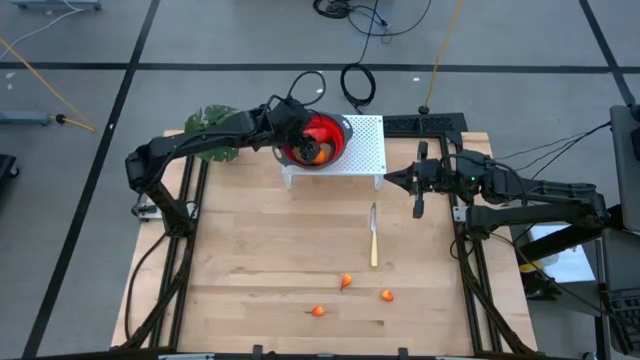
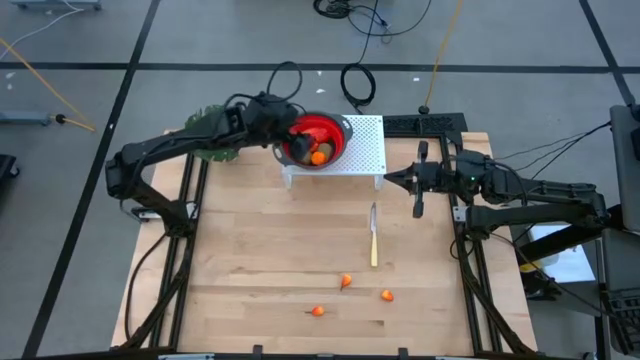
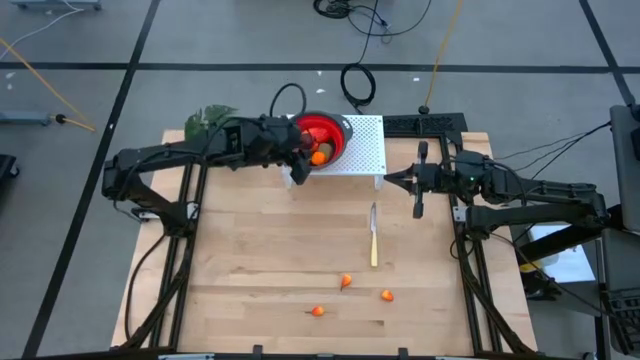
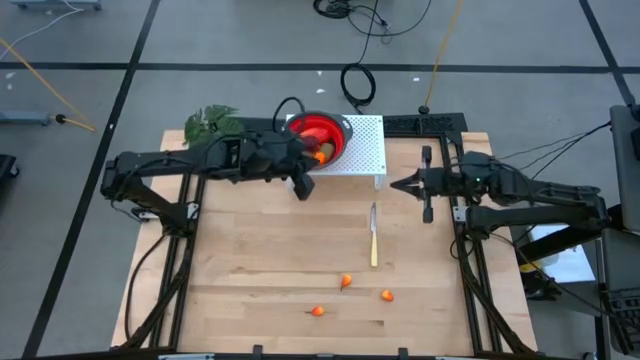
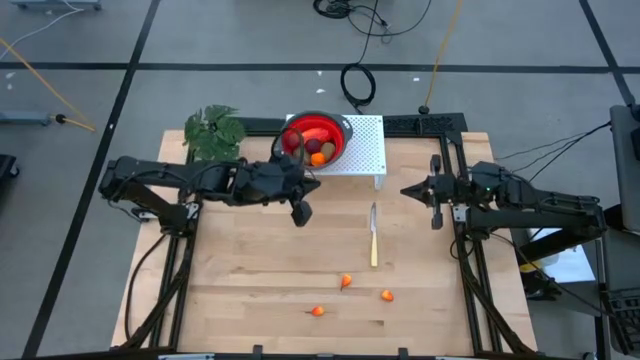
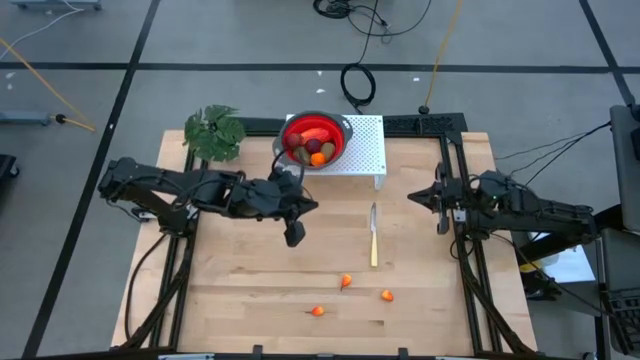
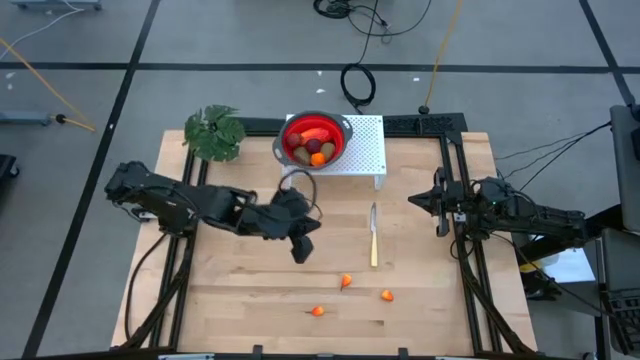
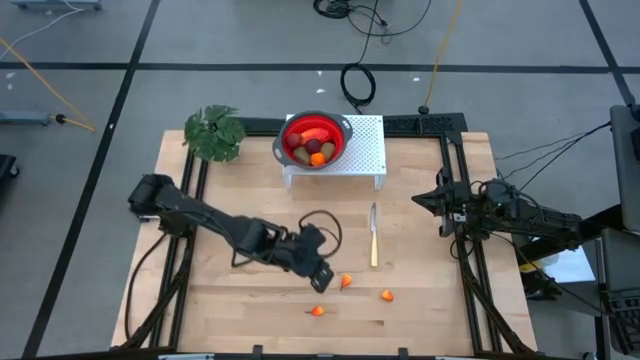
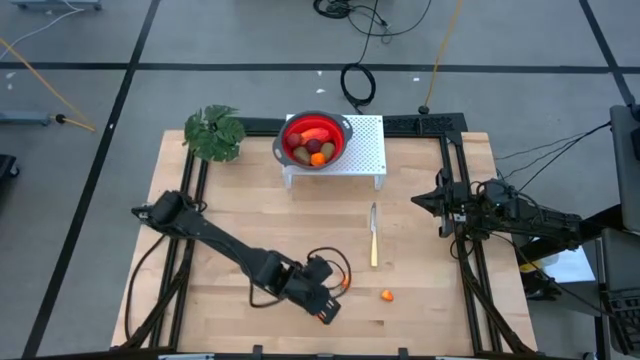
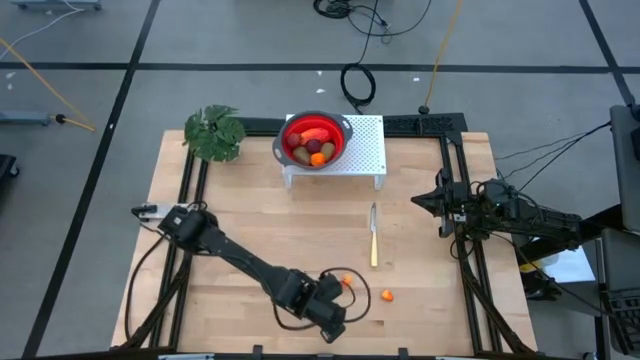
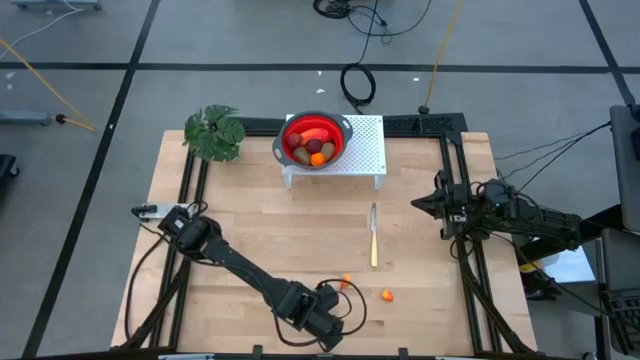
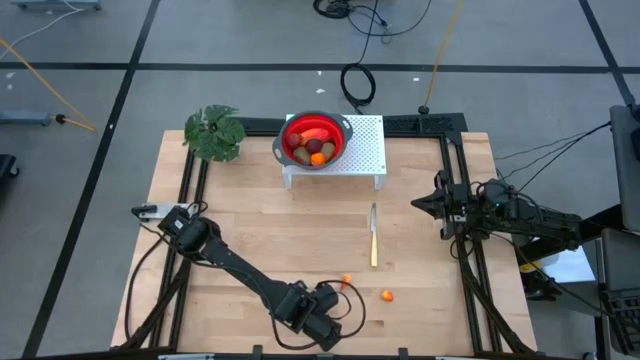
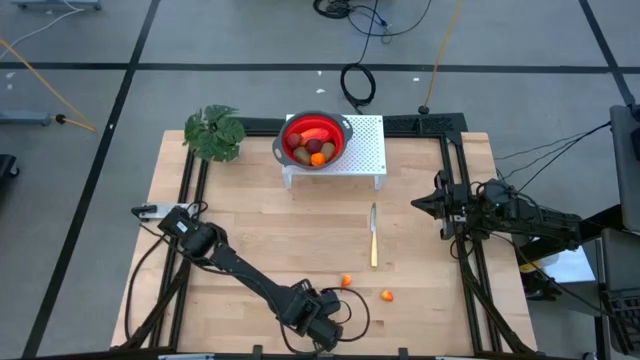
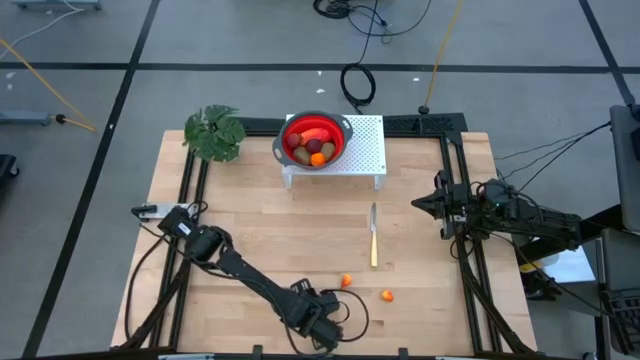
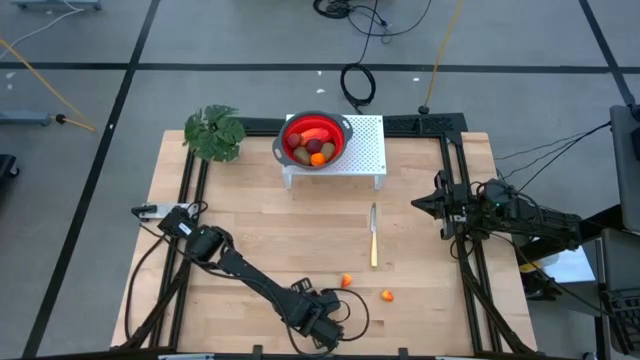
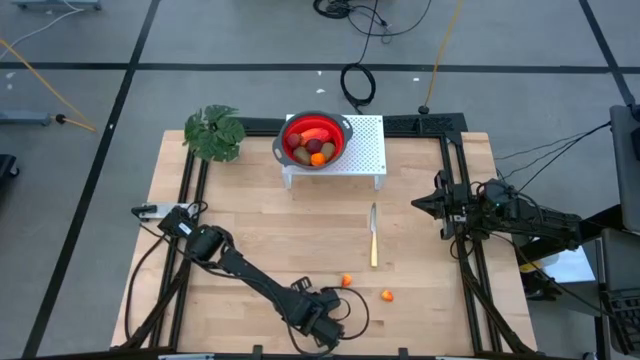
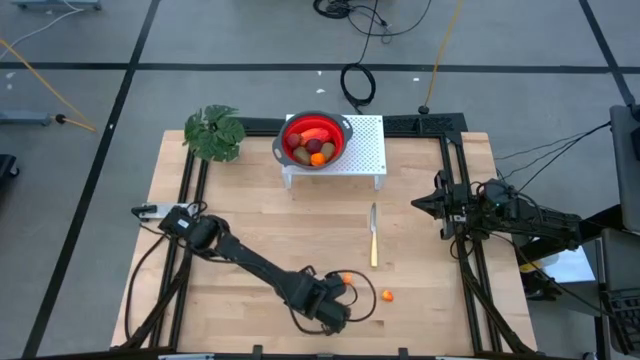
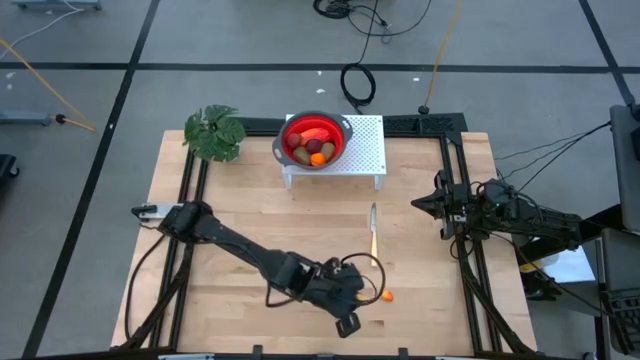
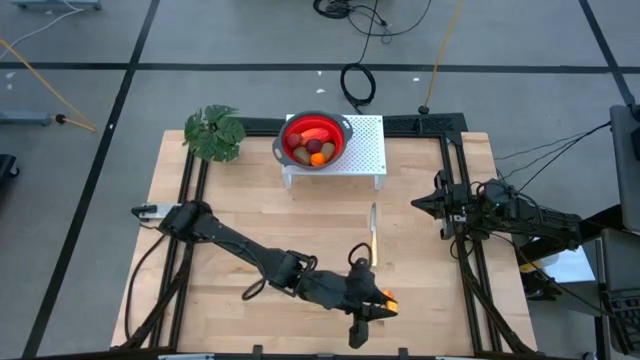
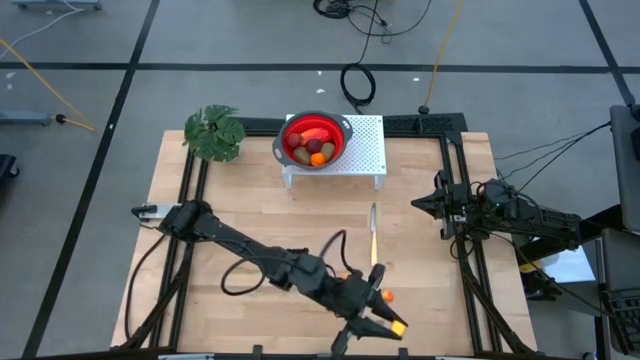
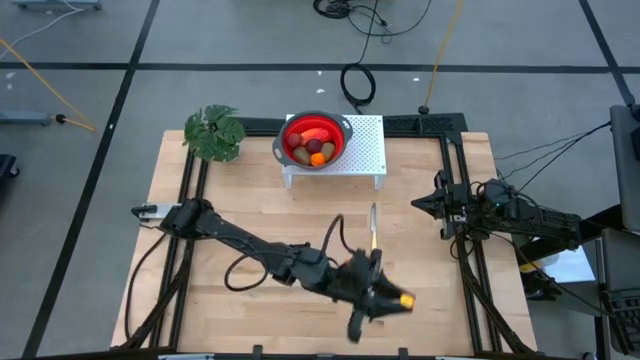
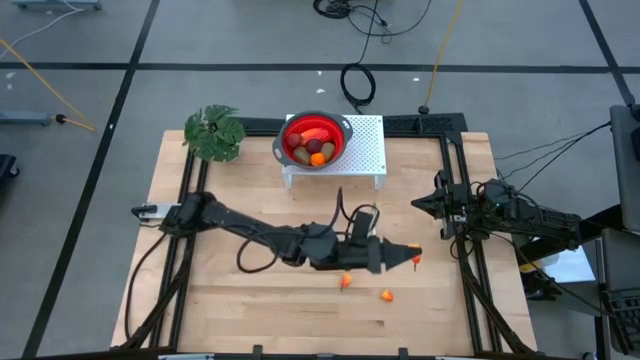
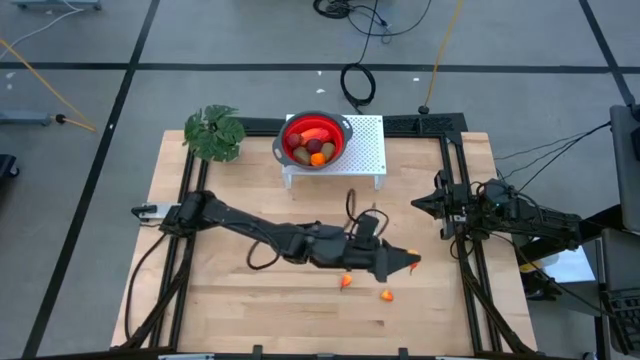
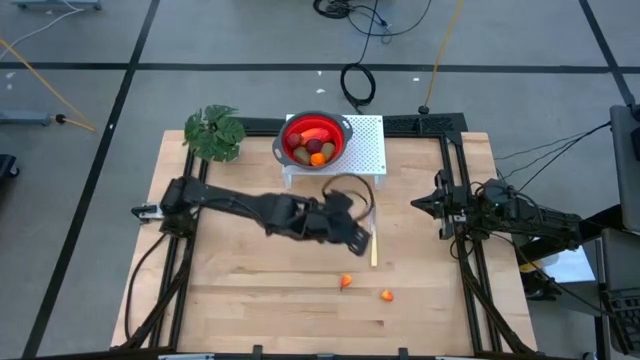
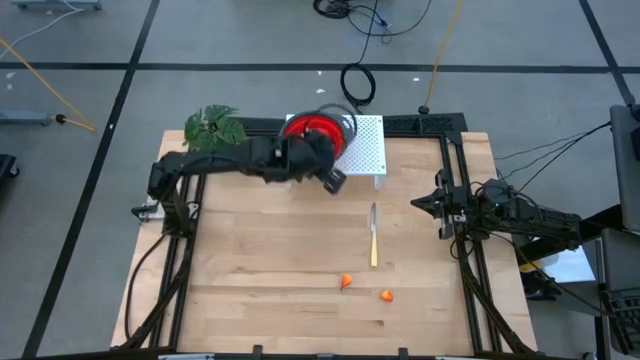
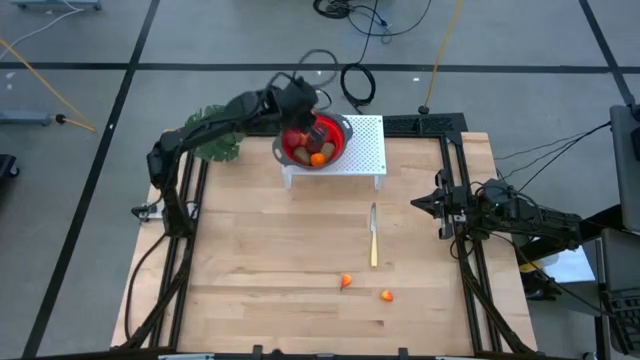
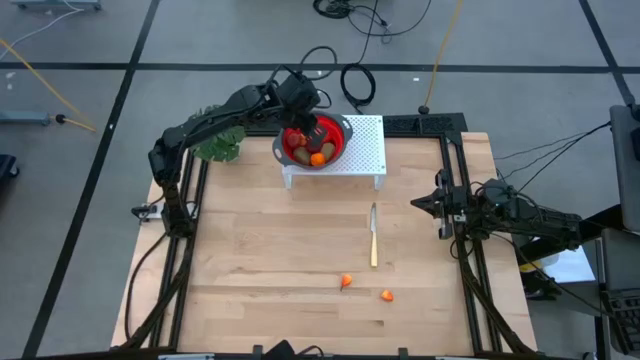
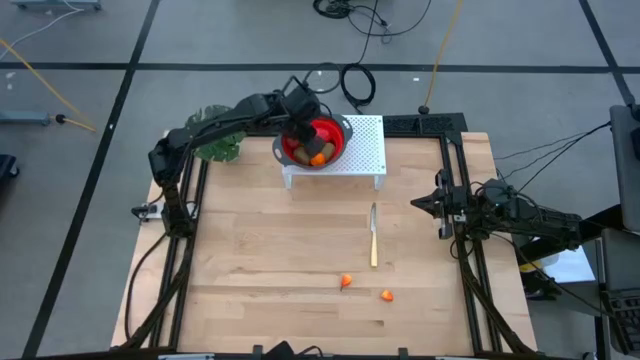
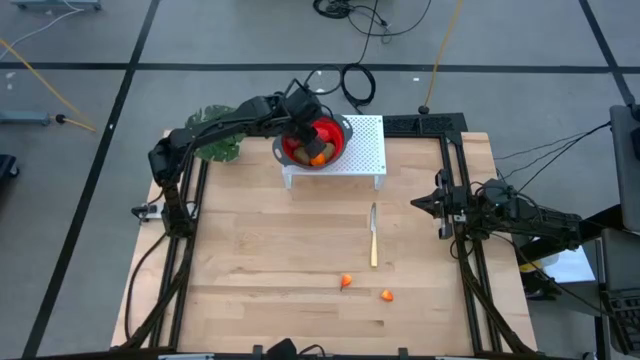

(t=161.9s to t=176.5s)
Task: Pick & Place Fruit
Put the orange pear into the red strainer bowl on the shelf
